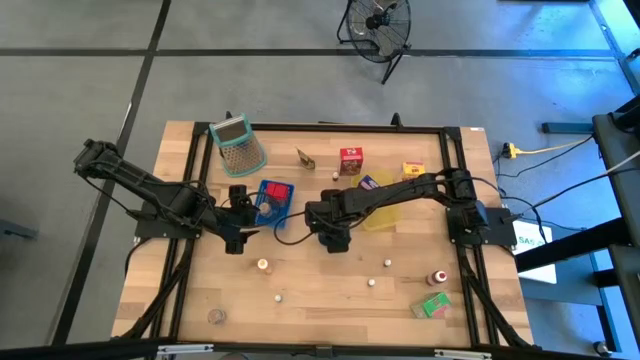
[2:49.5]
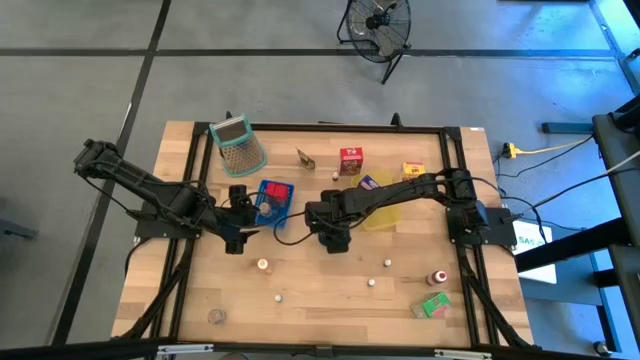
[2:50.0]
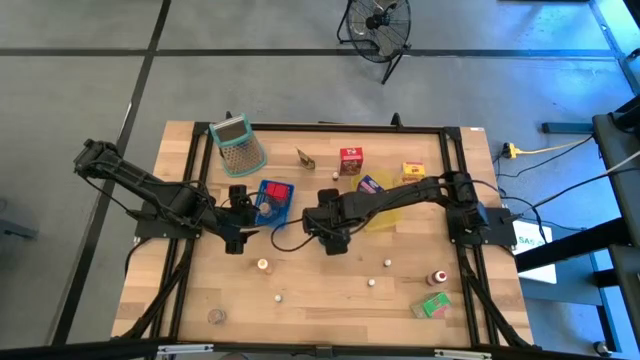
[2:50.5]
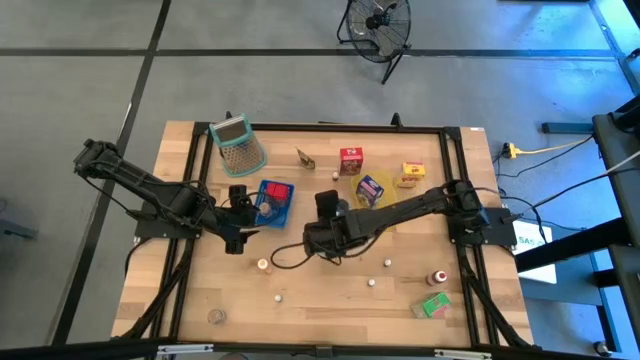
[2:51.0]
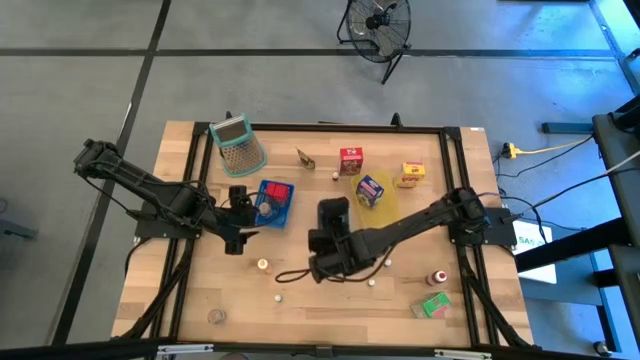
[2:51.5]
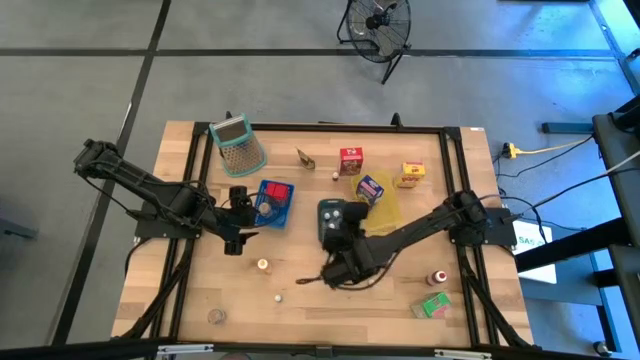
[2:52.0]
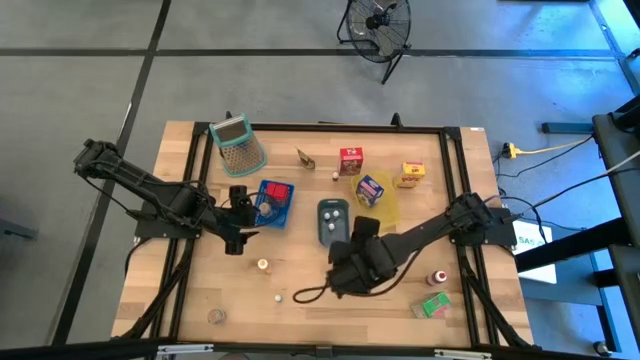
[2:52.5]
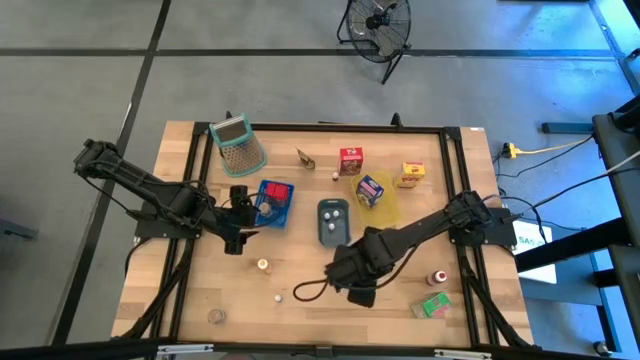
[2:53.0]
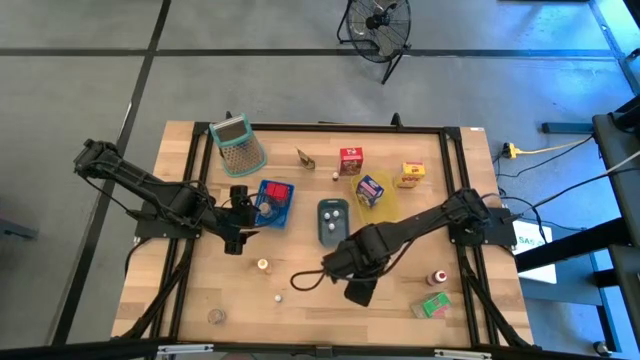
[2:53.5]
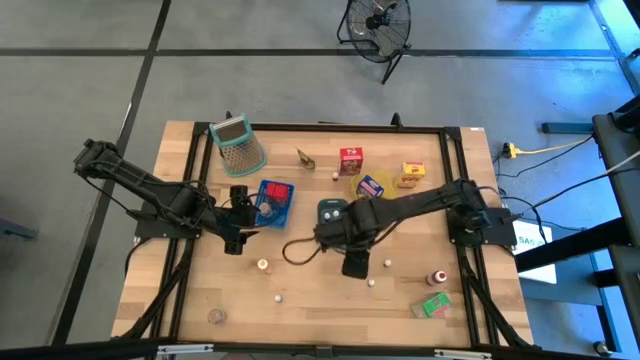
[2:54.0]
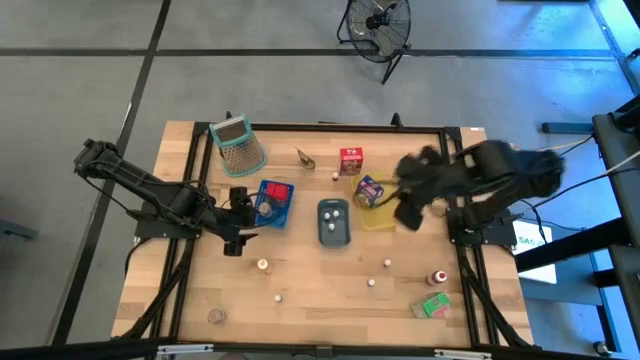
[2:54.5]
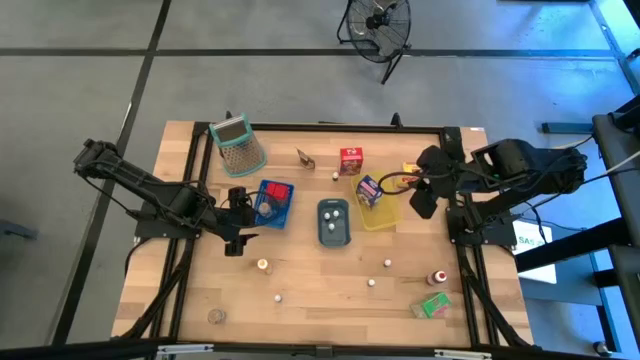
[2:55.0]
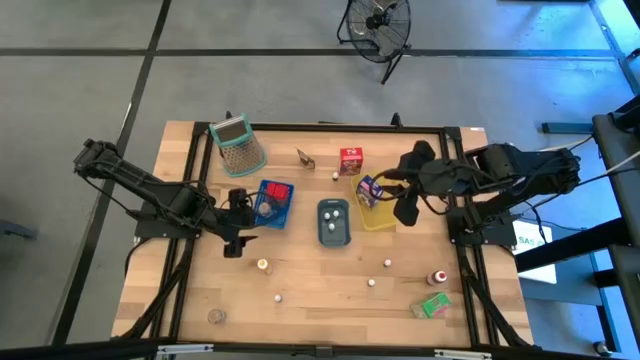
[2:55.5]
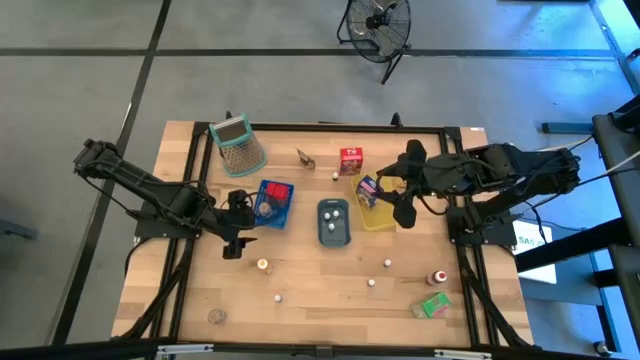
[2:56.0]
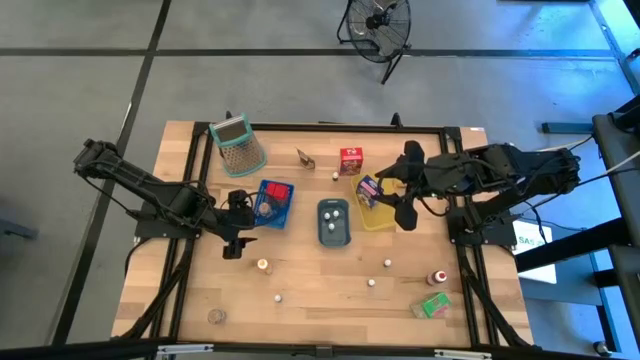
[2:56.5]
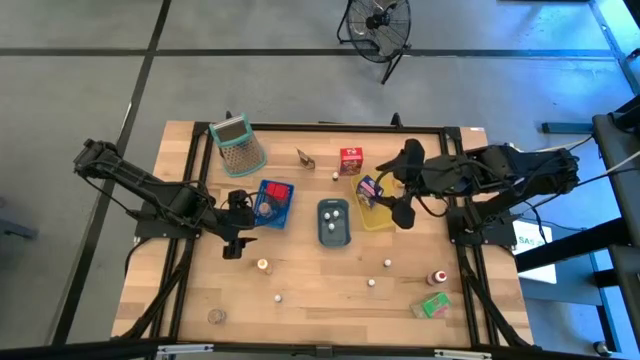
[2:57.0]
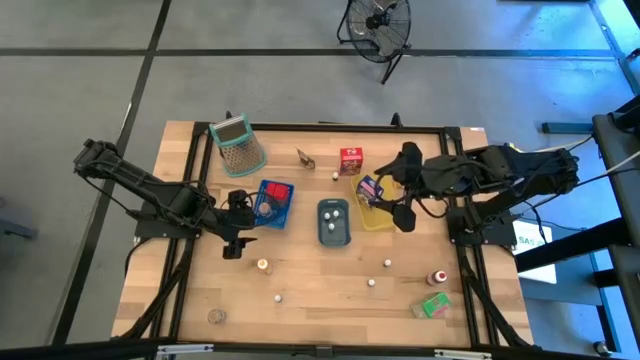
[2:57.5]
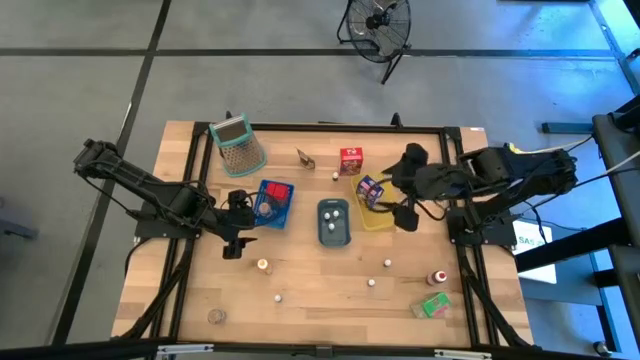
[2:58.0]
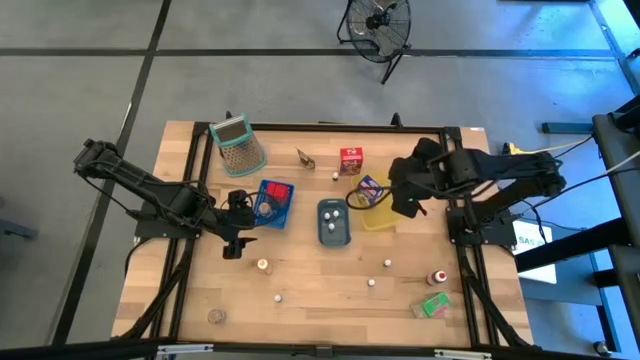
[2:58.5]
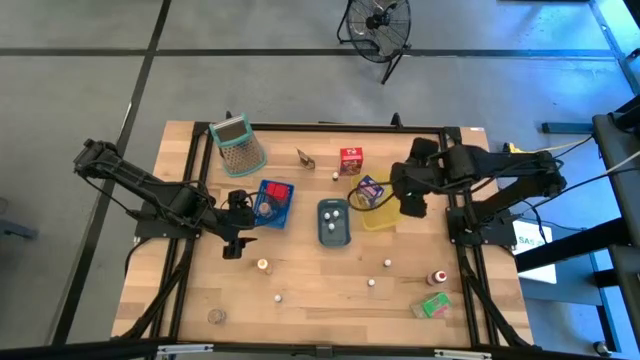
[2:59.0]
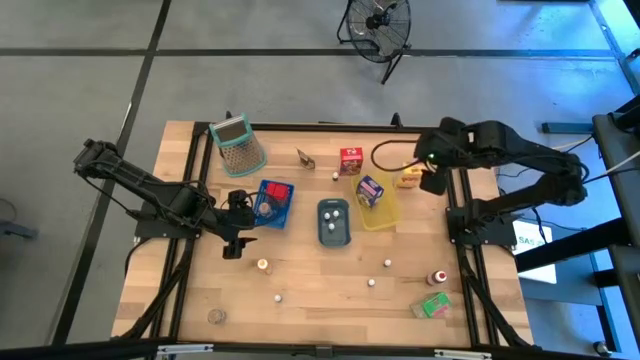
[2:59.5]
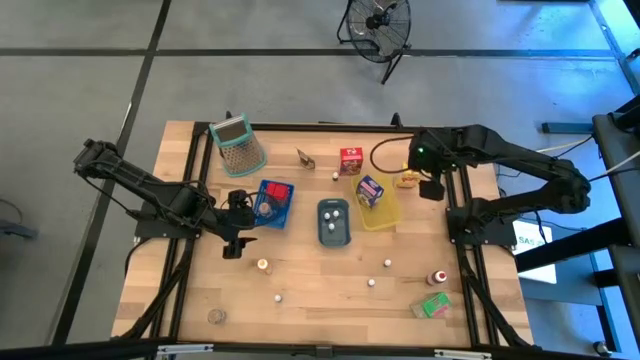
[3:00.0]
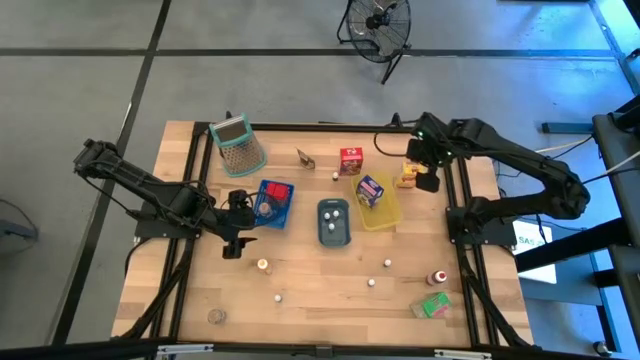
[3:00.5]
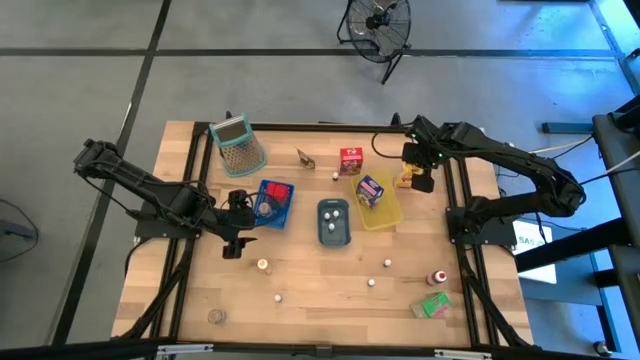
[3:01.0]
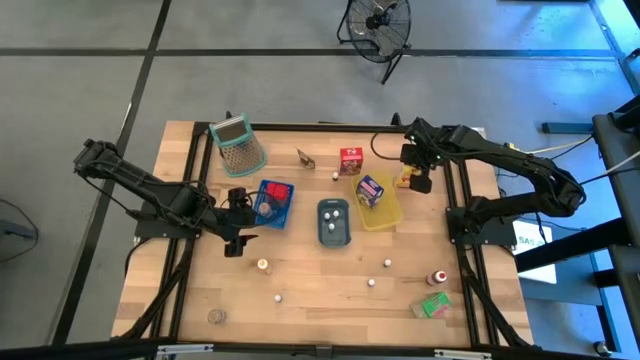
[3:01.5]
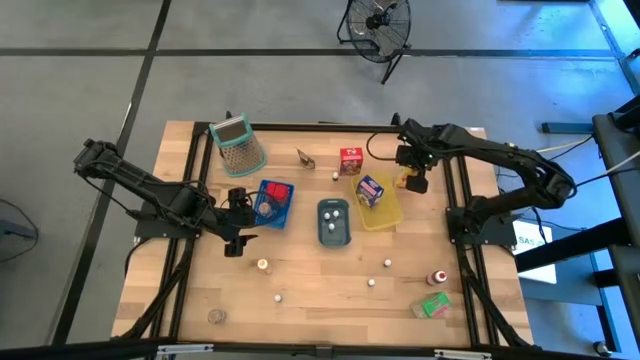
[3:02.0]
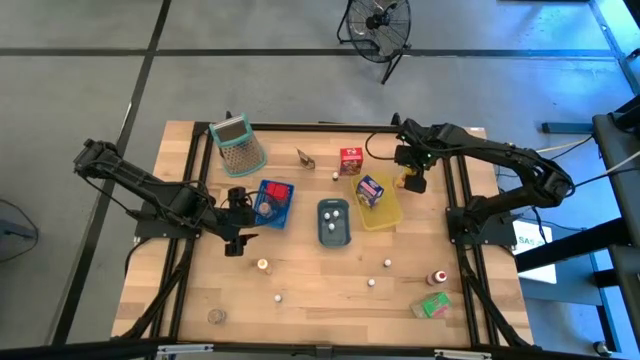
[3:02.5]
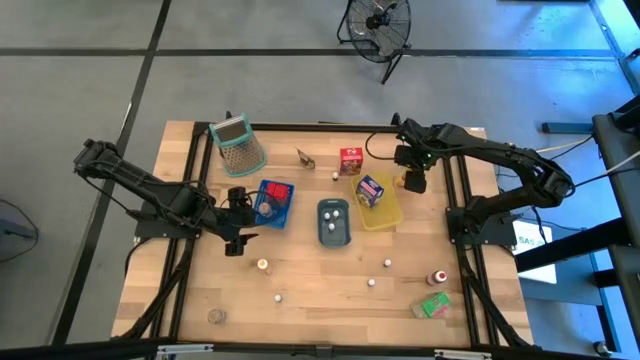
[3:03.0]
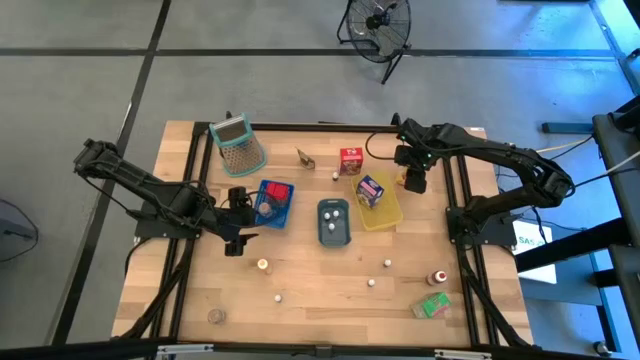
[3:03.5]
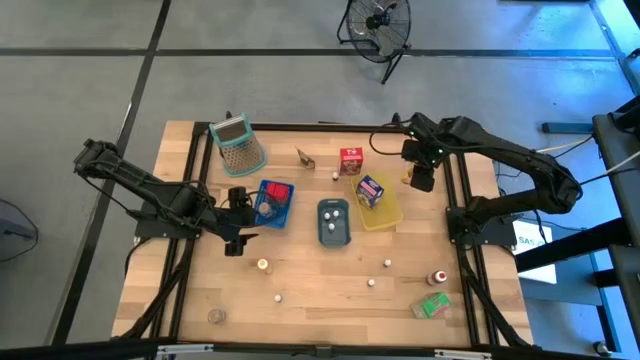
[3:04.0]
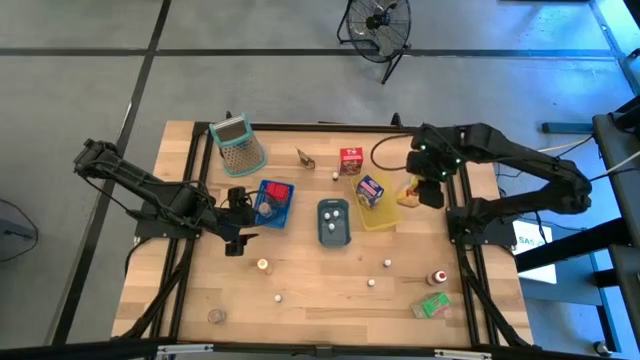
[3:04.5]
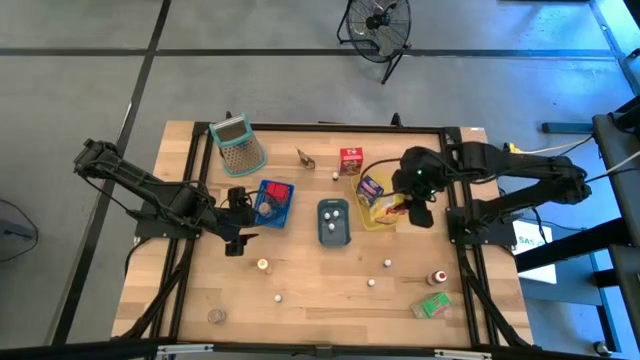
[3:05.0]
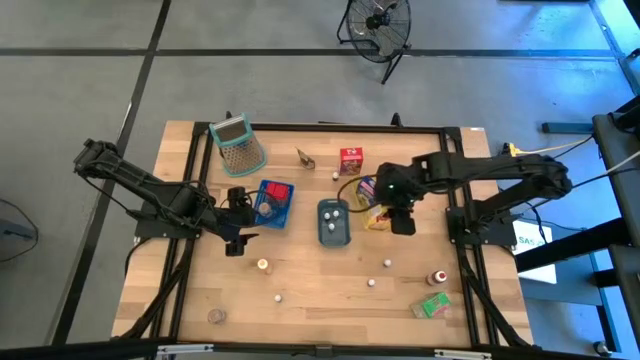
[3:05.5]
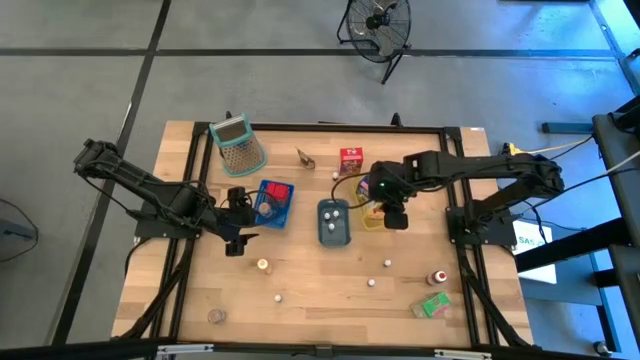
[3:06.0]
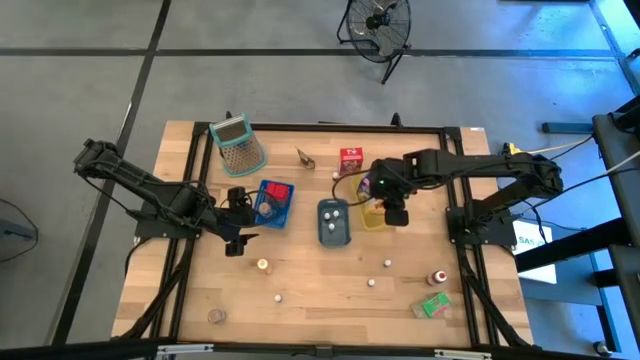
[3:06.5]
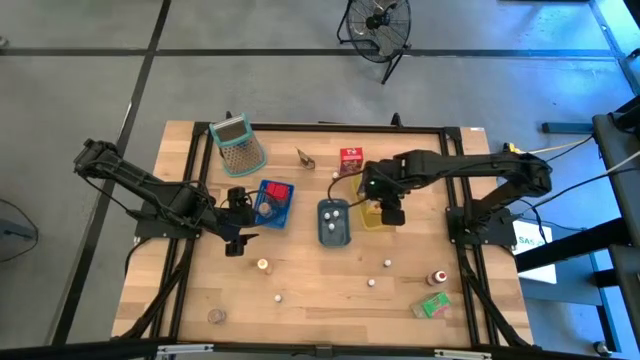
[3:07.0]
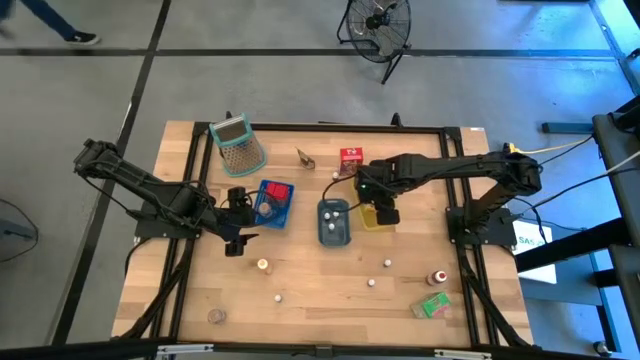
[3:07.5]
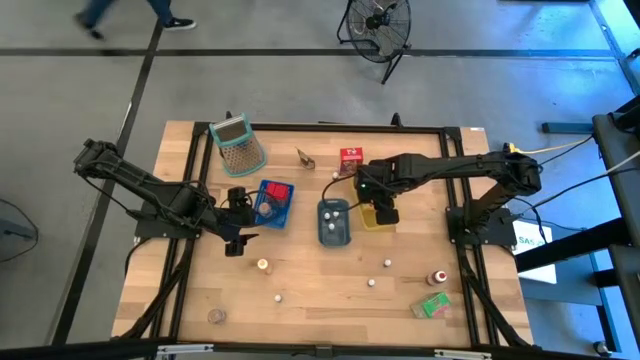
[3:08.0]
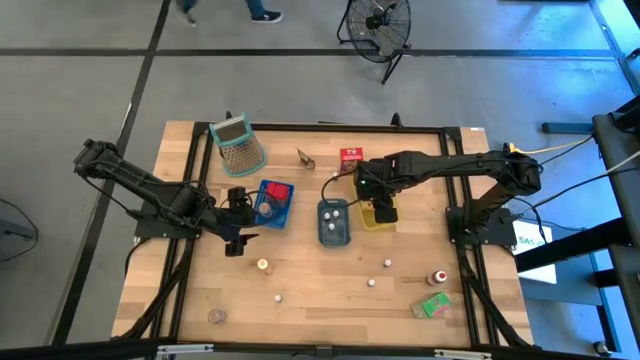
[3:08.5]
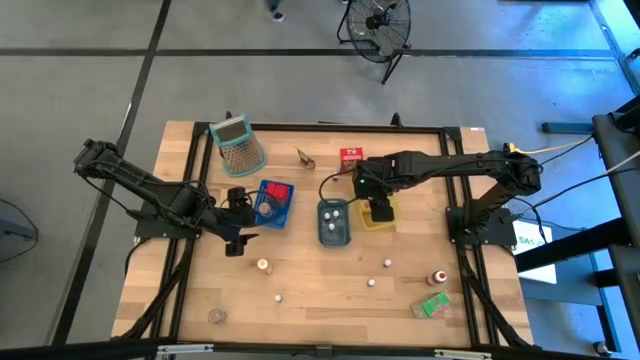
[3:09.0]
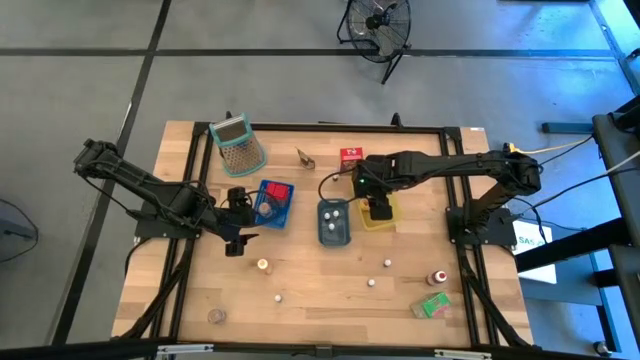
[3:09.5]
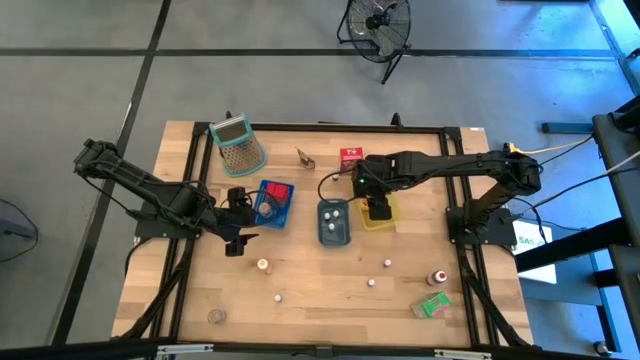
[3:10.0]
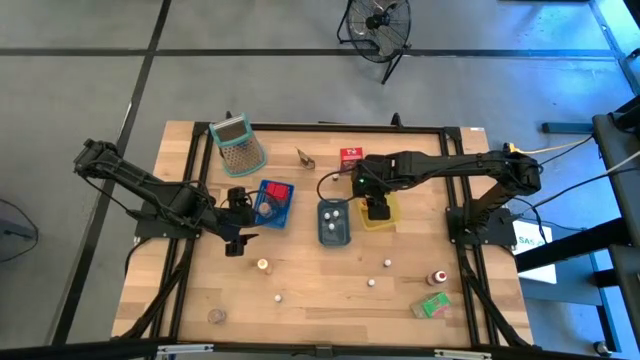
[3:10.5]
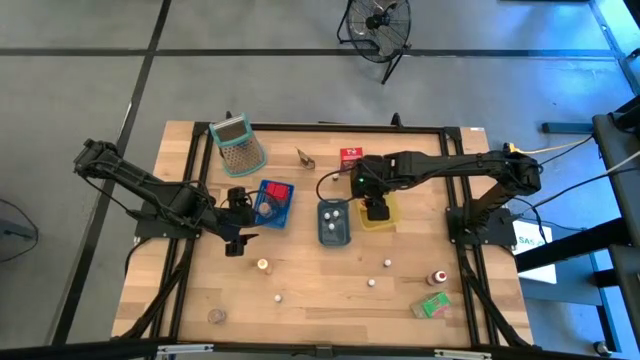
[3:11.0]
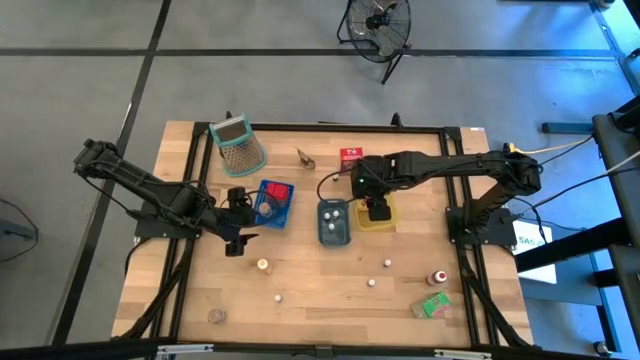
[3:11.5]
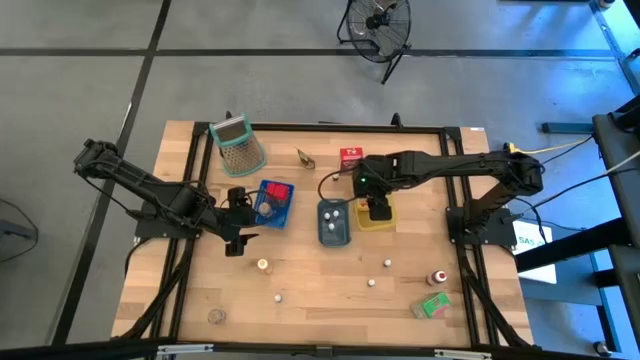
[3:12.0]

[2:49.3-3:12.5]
Task: Pick & Place Kitchen Items
Put the yellow cereal box into the yellow bin
